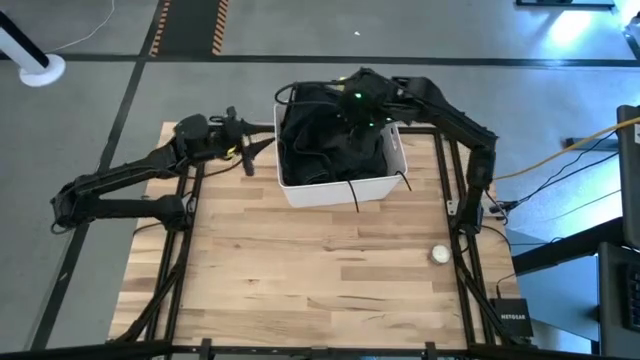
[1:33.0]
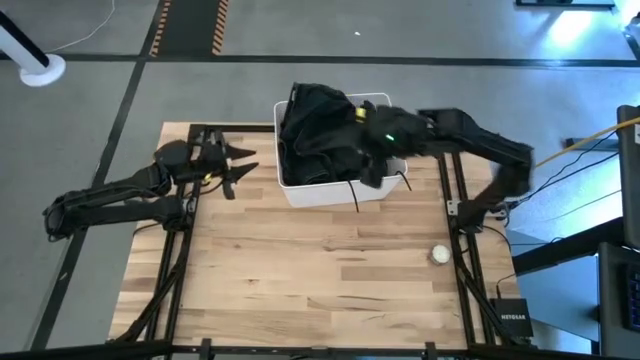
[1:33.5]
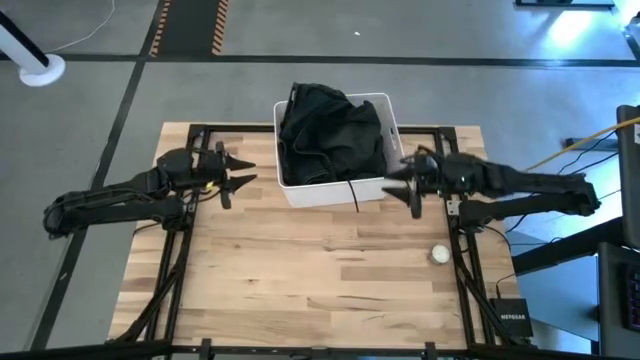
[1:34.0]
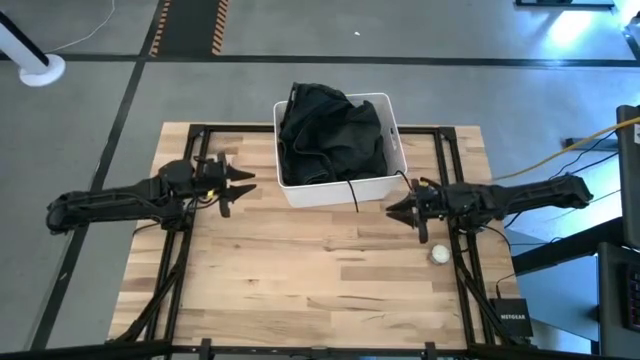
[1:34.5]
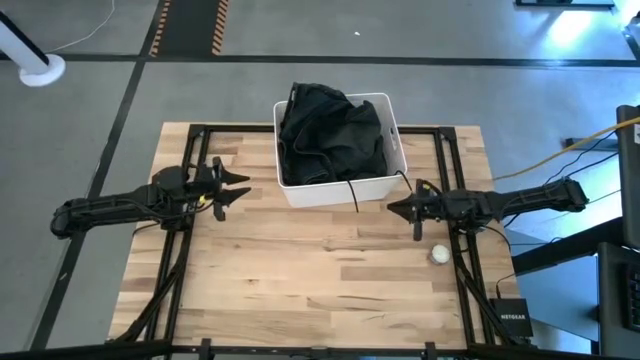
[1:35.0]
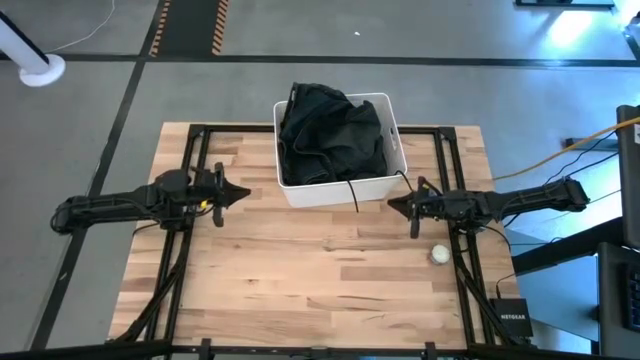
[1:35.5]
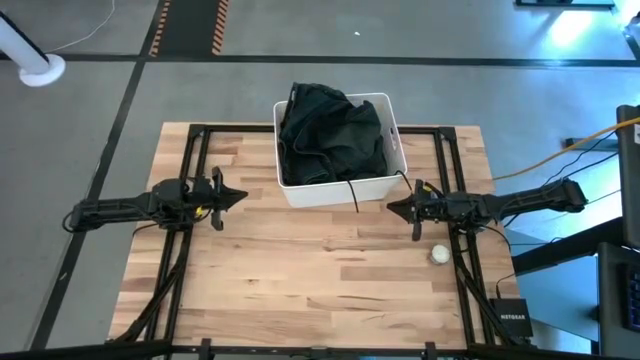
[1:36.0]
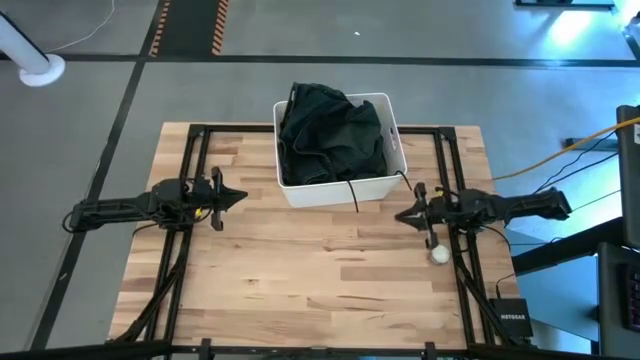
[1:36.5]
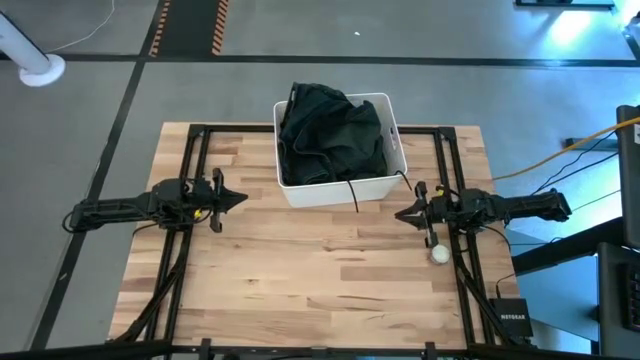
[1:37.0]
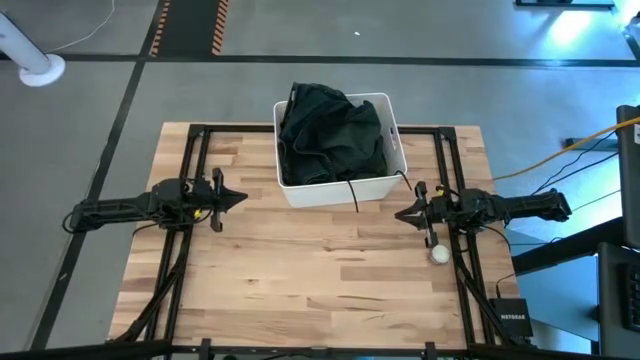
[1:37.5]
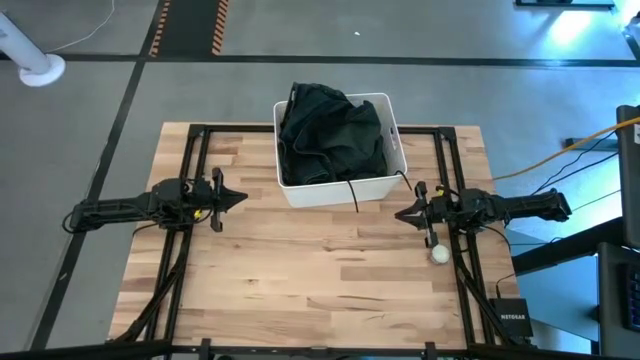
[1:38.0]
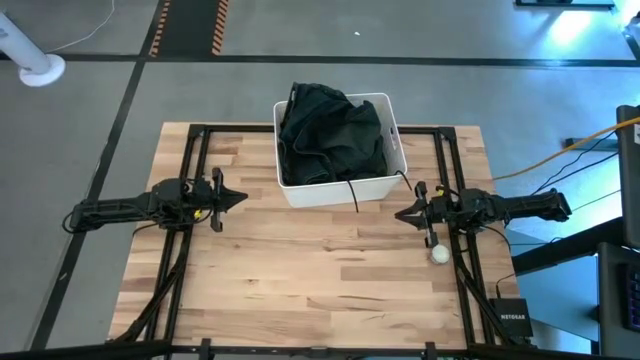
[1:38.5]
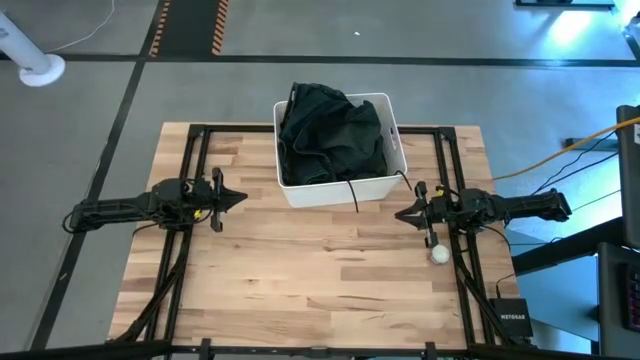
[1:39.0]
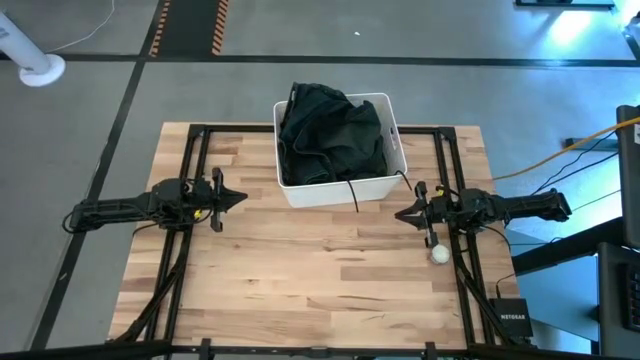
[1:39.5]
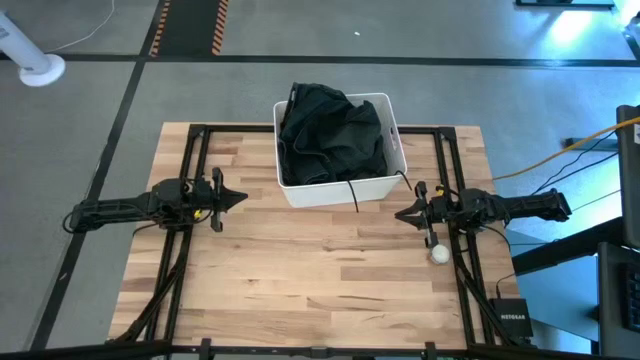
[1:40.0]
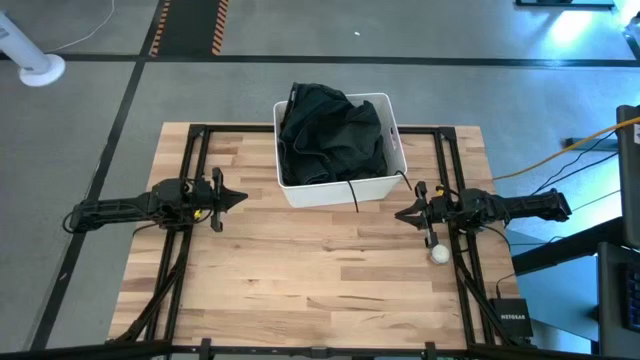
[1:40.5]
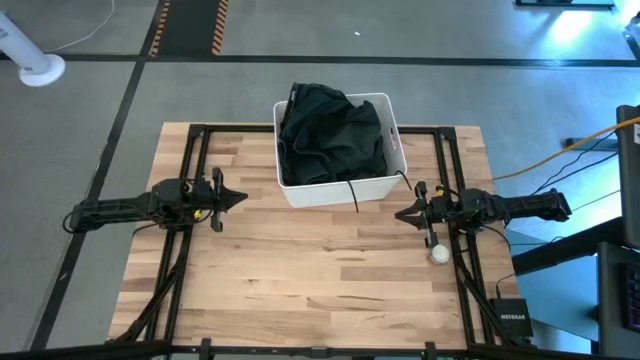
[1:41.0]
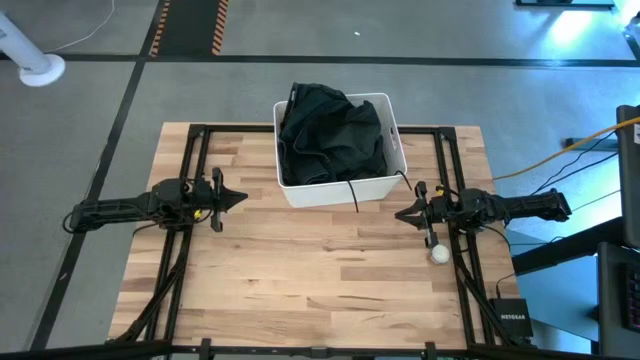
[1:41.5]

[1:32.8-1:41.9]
Task: Sort clothes
Return to Home Position

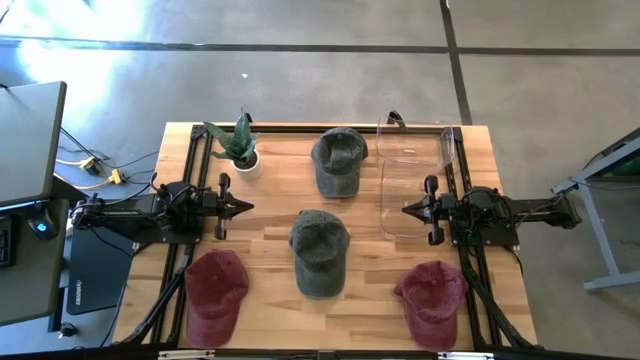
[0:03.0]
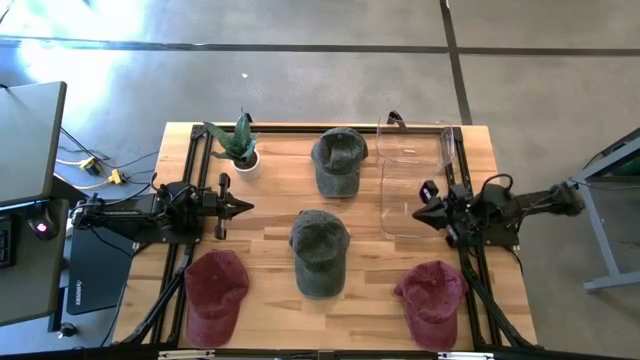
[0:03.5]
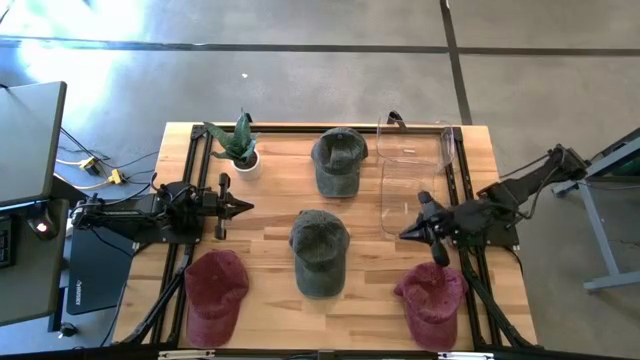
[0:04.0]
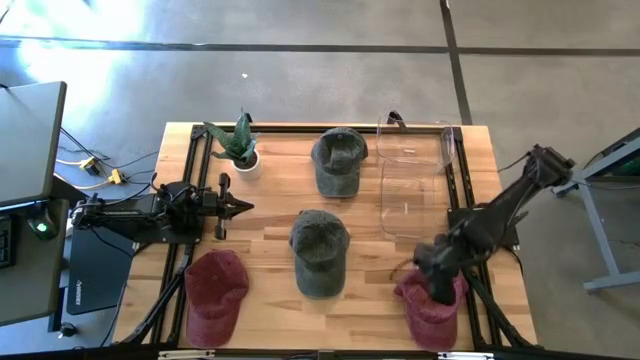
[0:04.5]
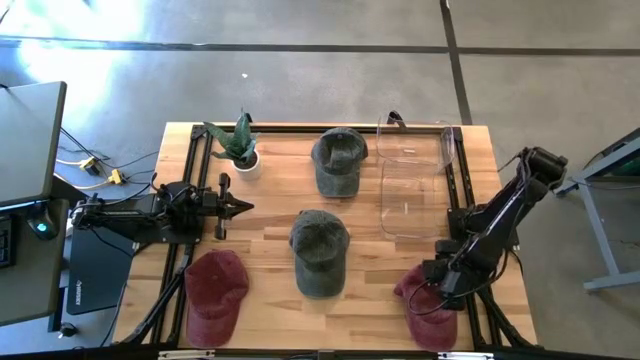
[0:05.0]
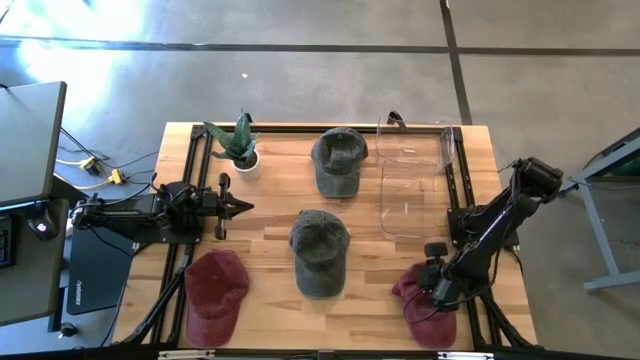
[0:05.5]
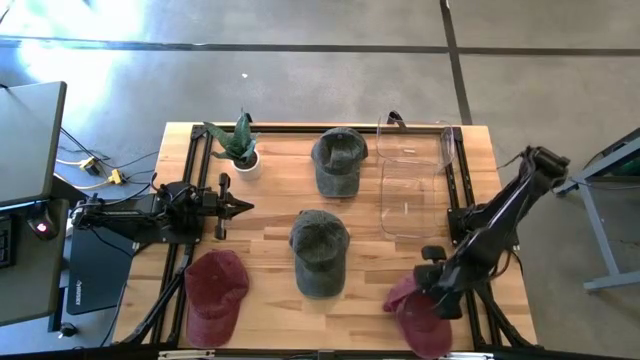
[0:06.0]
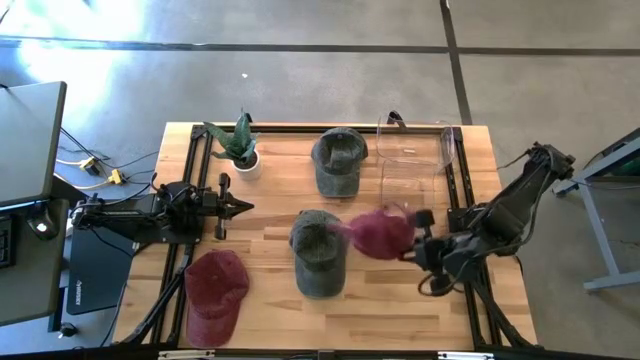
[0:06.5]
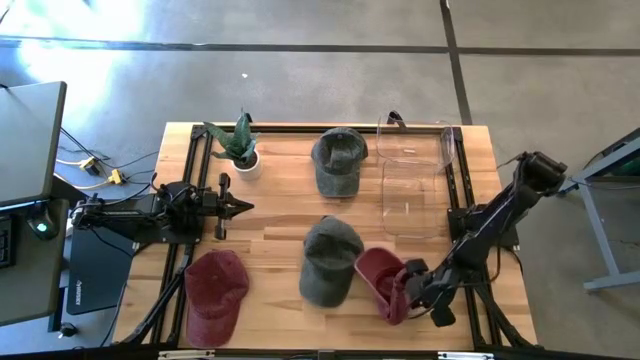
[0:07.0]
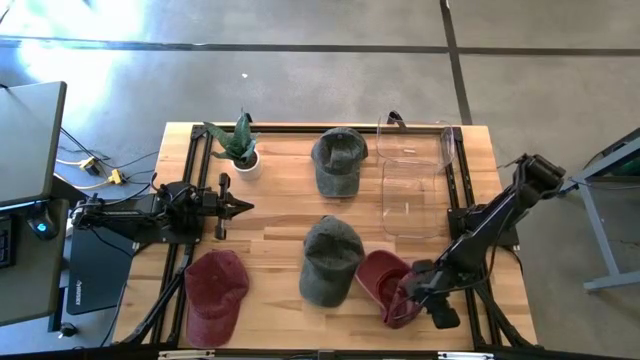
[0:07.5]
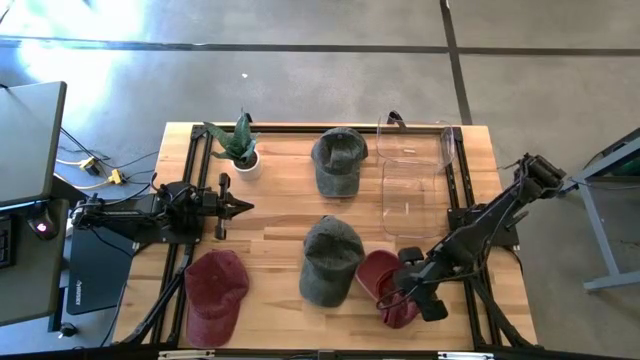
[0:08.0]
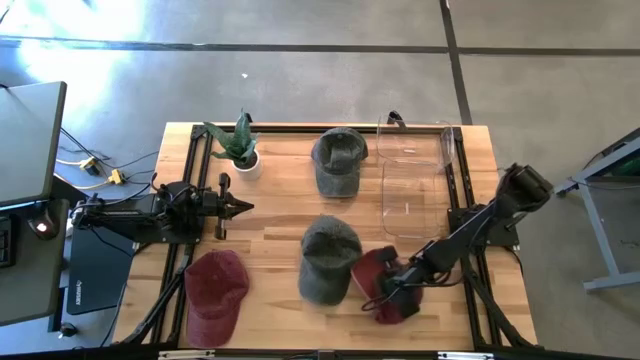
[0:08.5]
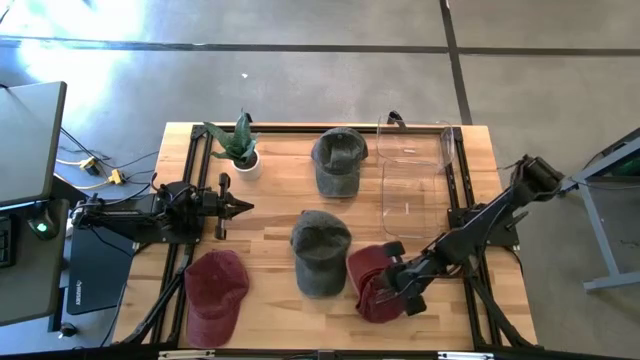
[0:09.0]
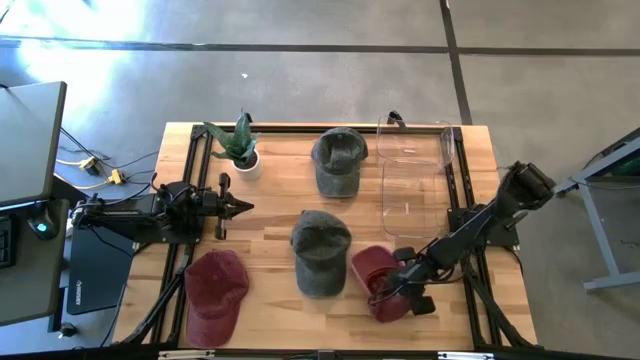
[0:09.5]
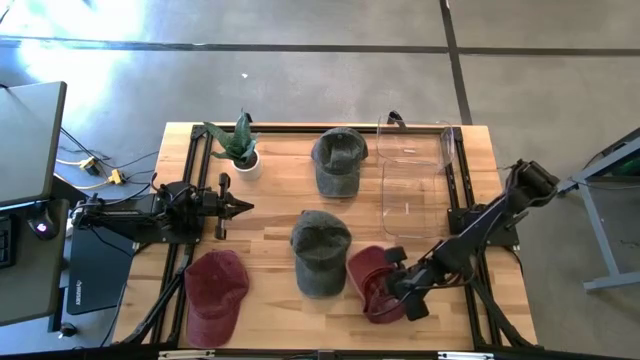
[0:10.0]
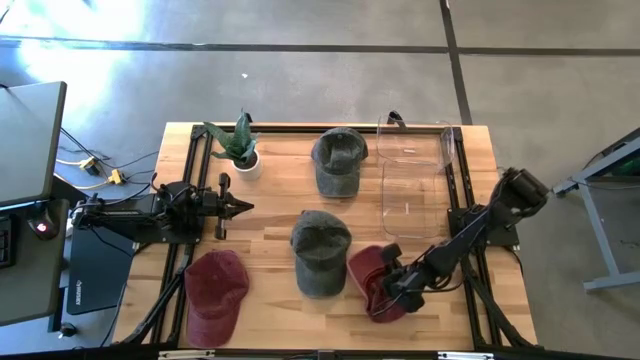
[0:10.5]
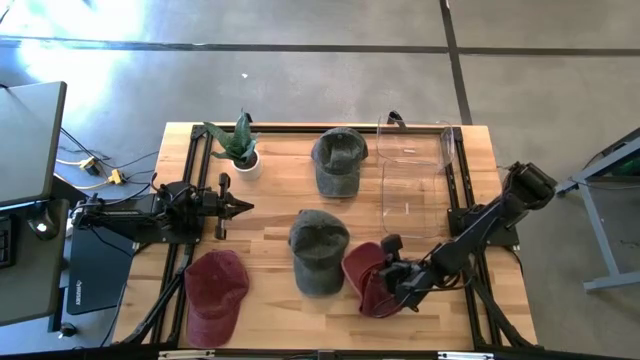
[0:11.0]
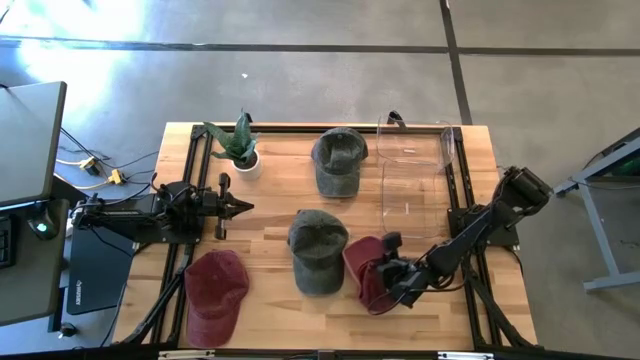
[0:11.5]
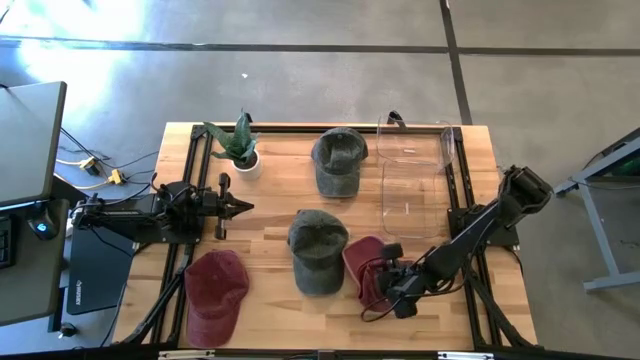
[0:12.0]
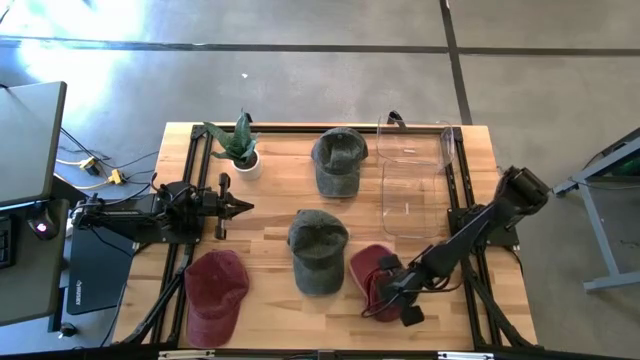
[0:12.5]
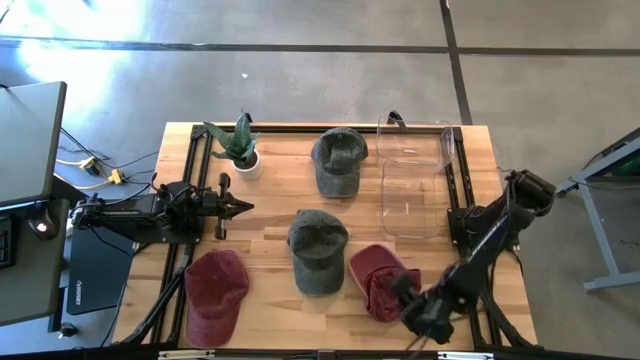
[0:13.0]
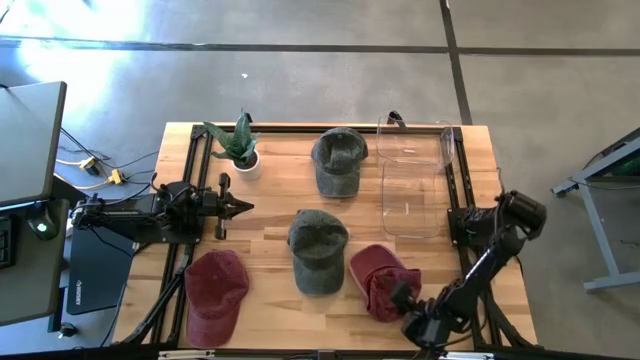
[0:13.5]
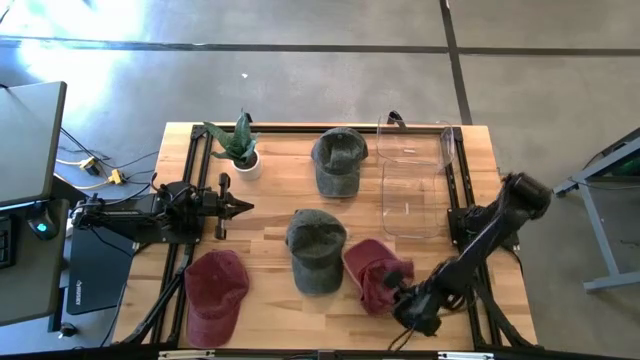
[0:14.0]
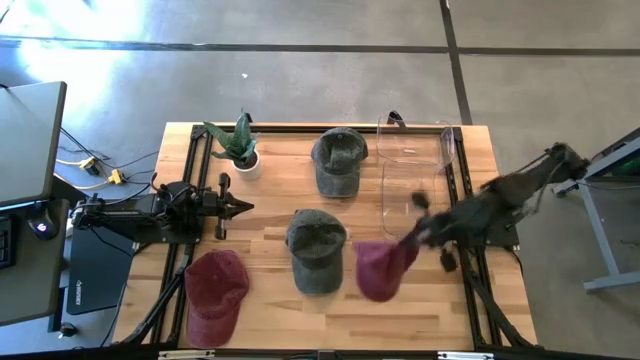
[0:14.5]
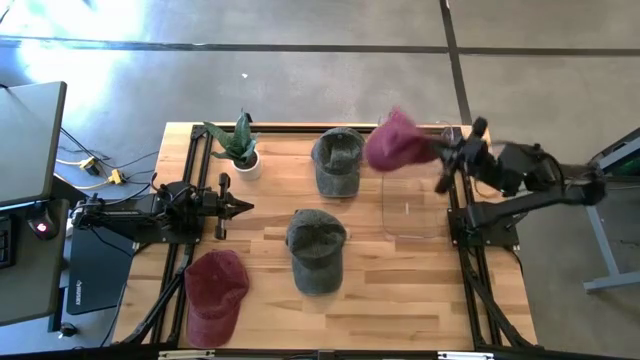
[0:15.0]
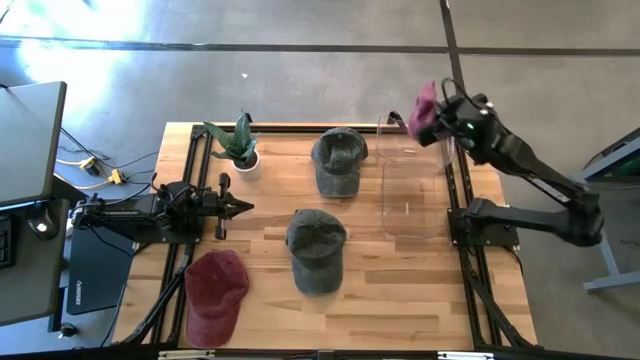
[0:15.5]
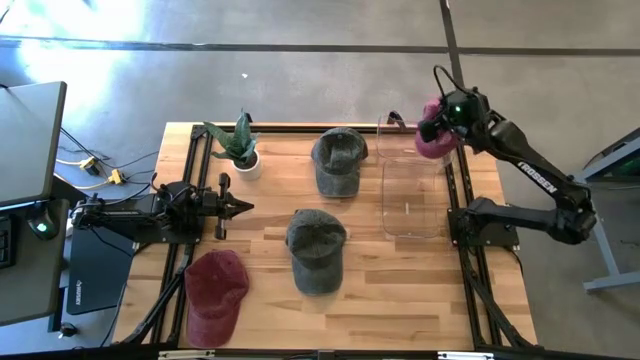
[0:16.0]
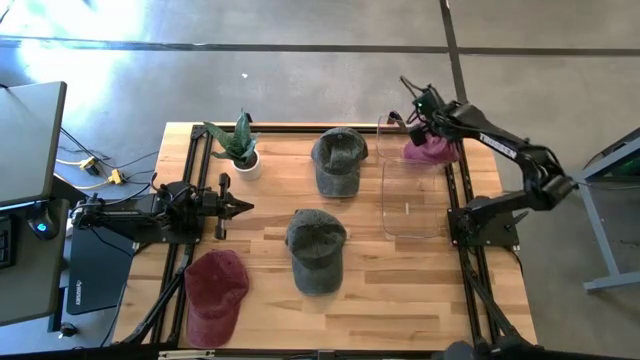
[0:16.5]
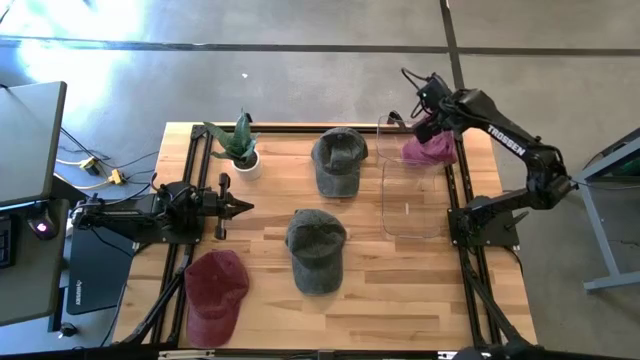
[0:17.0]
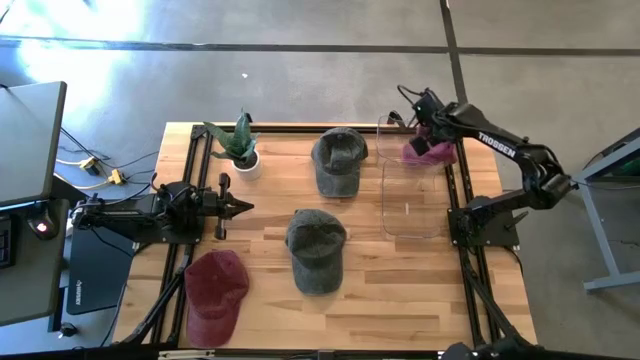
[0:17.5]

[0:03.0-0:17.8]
Task: Pick & Place hat
Put the right red cap into the top transparent bin
